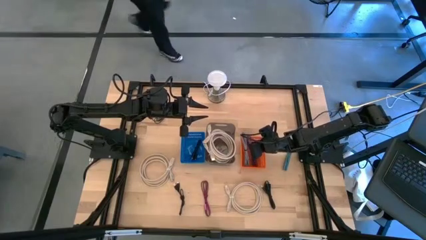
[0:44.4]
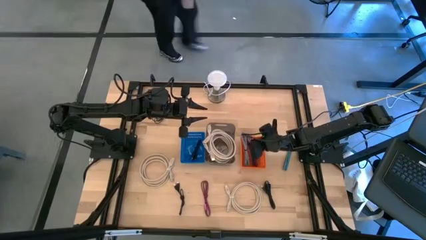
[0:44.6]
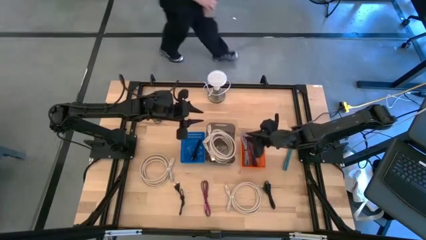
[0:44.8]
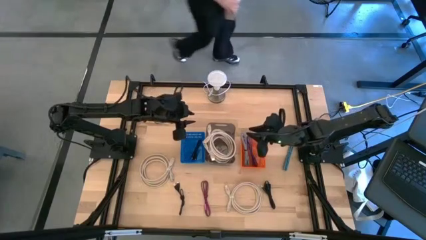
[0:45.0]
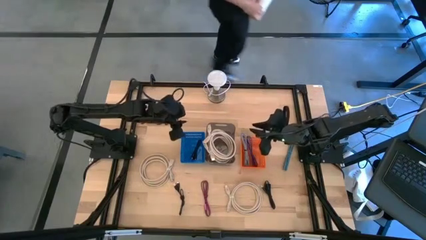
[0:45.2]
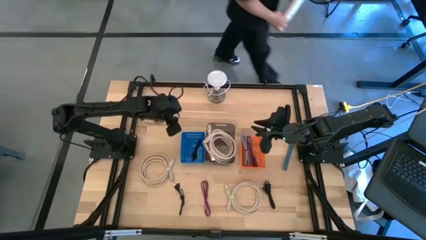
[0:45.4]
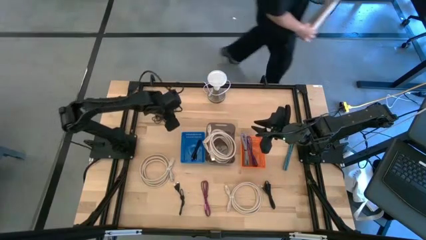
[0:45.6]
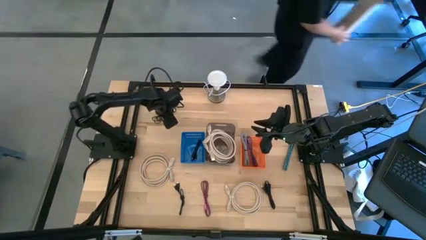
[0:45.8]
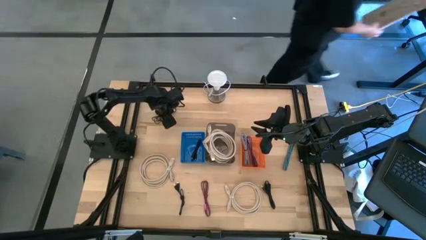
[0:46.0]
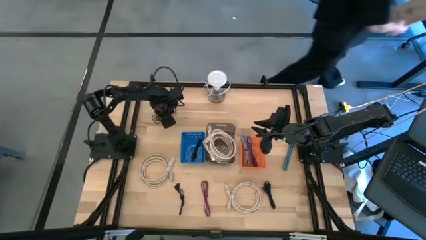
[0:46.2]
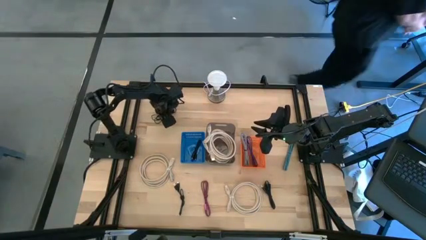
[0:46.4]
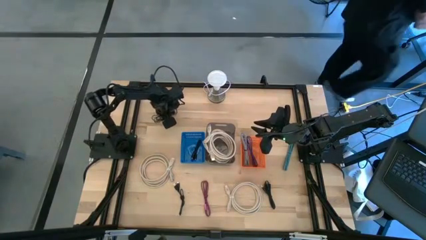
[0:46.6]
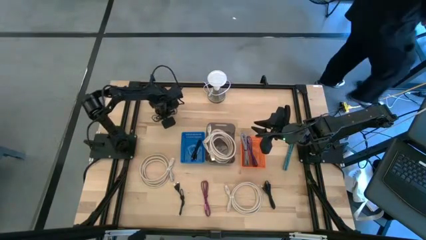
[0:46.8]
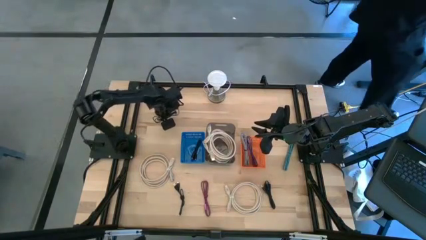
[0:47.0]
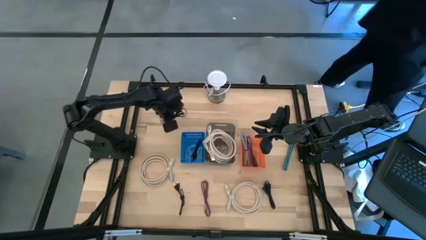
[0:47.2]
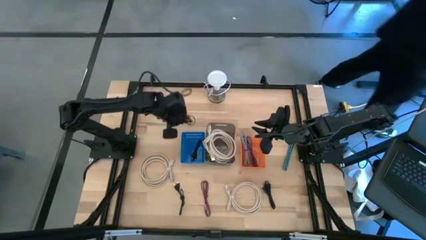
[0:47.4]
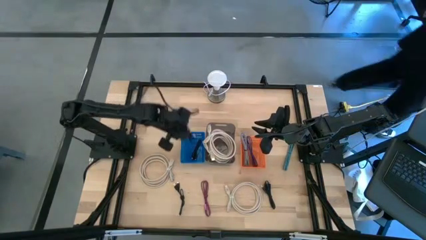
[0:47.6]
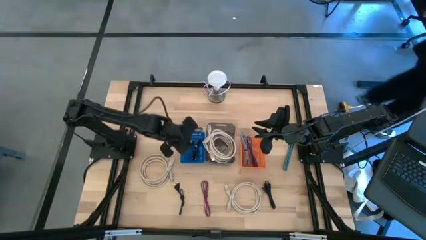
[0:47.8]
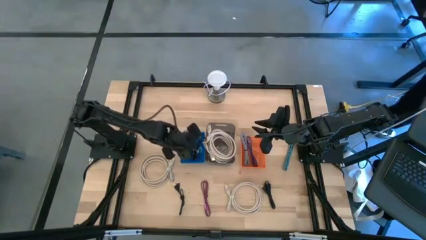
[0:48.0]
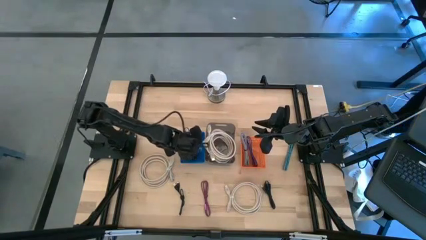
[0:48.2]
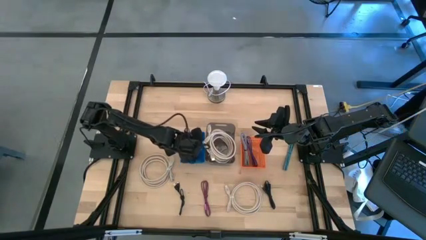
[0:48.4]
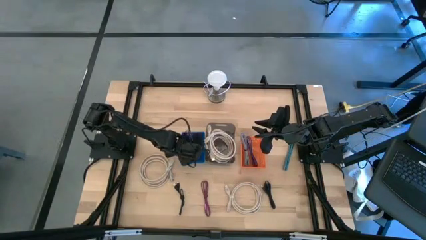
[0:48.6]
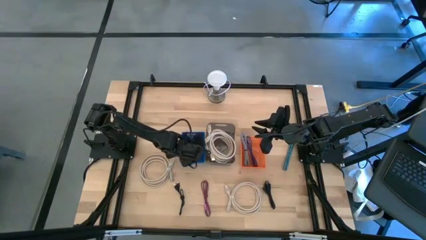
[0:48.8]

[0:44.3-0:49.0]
Task: Pick & Place USB Port
Put the black charger cable into the blue bin

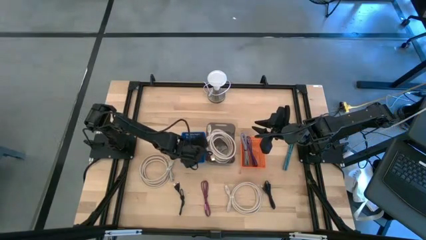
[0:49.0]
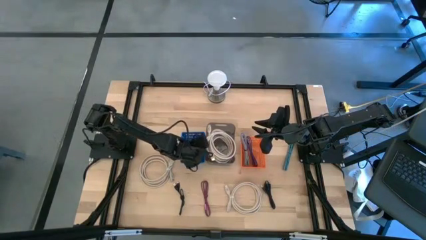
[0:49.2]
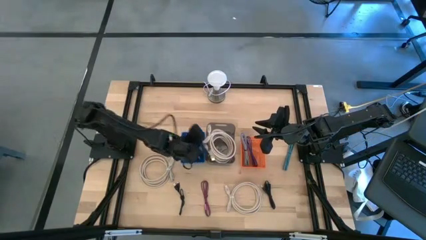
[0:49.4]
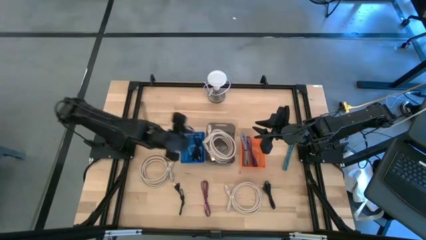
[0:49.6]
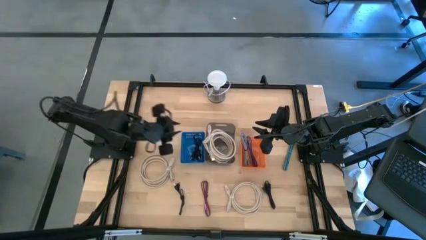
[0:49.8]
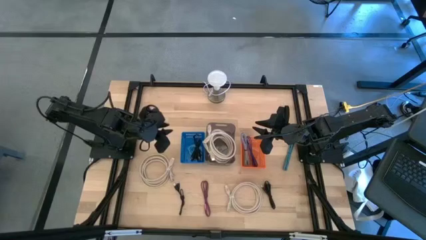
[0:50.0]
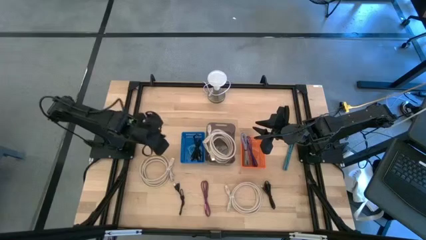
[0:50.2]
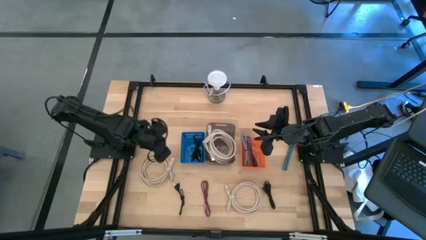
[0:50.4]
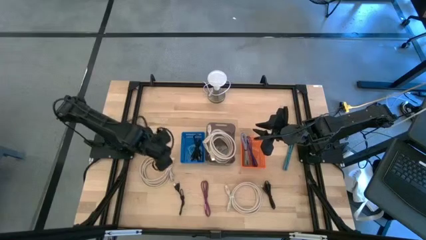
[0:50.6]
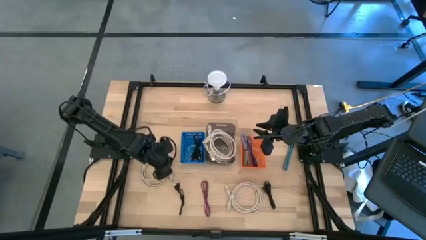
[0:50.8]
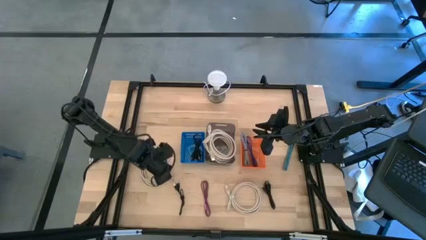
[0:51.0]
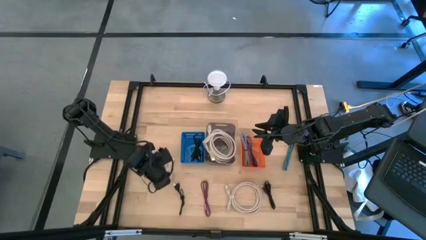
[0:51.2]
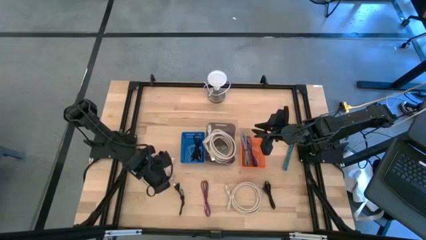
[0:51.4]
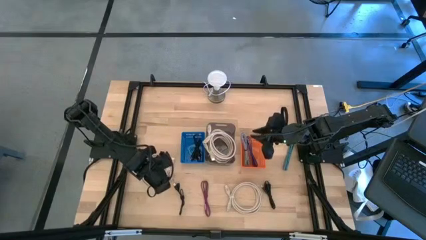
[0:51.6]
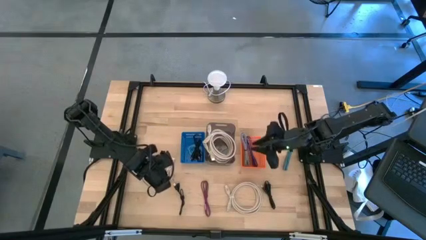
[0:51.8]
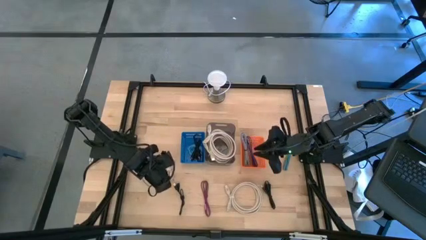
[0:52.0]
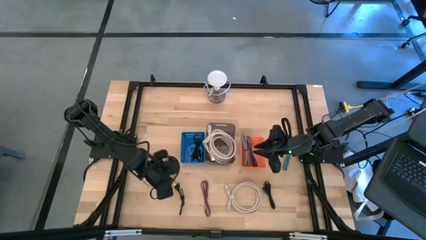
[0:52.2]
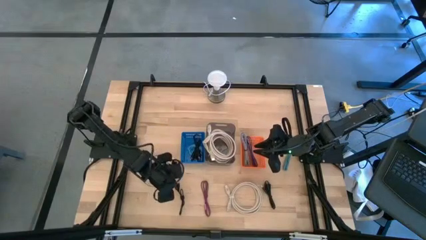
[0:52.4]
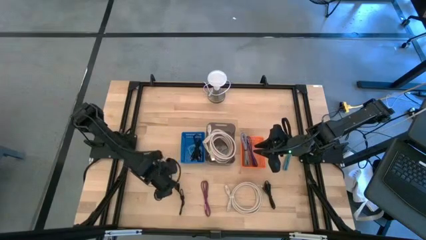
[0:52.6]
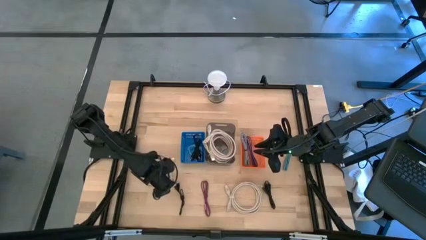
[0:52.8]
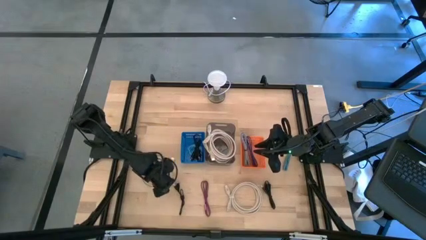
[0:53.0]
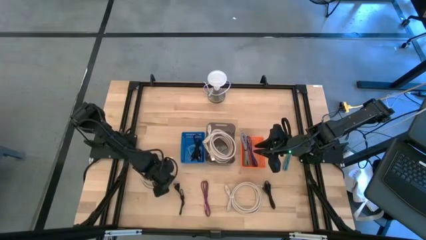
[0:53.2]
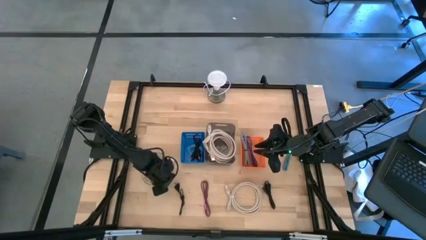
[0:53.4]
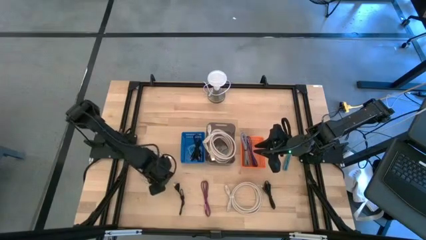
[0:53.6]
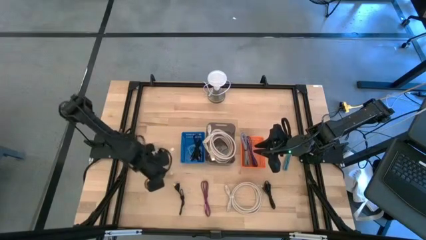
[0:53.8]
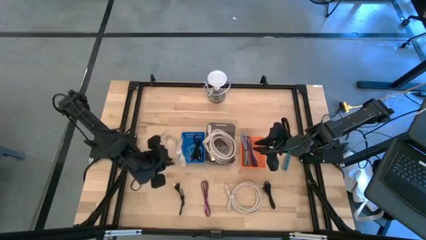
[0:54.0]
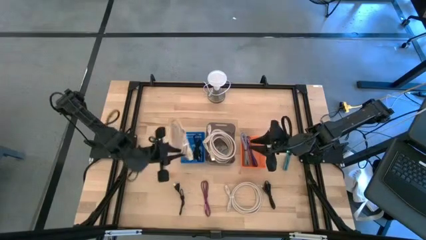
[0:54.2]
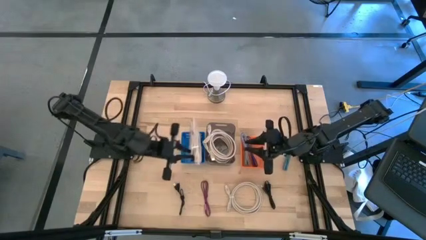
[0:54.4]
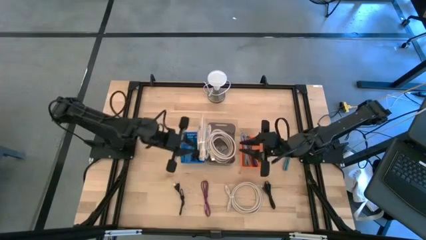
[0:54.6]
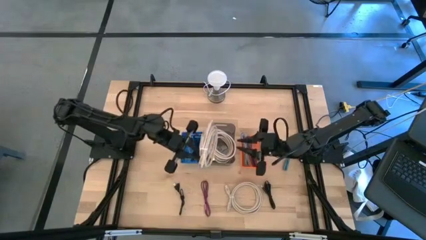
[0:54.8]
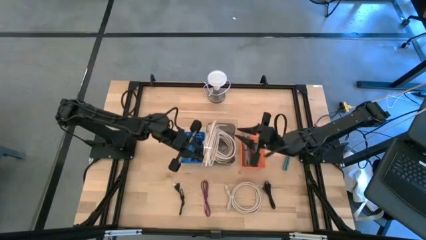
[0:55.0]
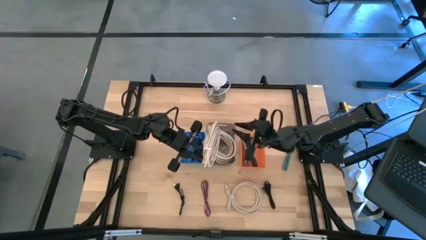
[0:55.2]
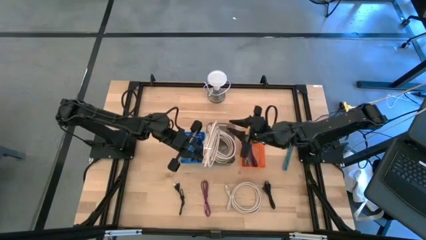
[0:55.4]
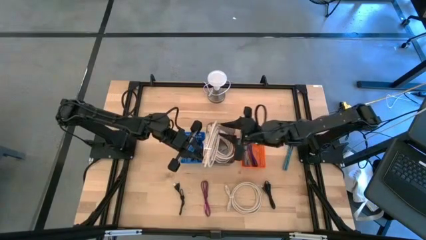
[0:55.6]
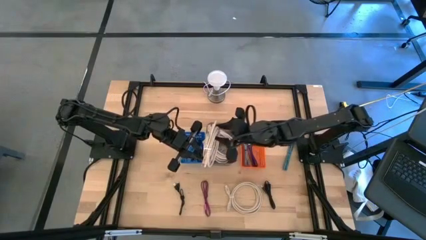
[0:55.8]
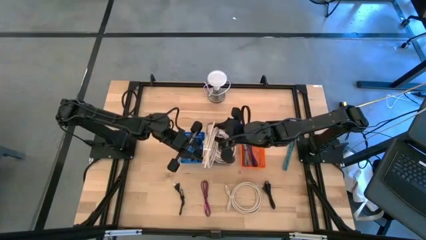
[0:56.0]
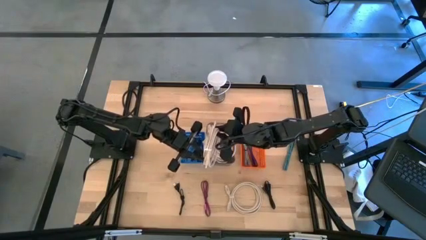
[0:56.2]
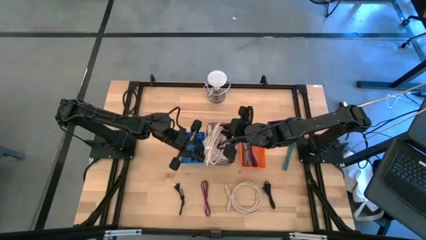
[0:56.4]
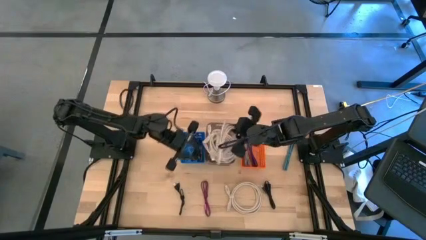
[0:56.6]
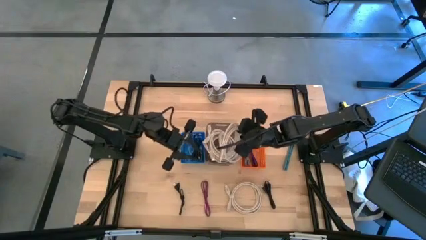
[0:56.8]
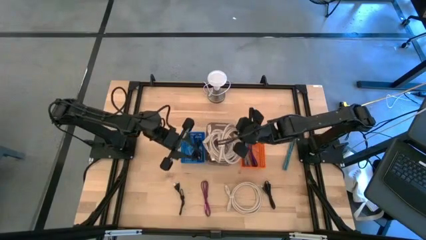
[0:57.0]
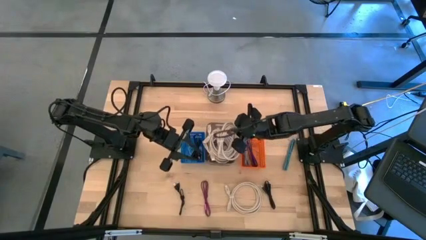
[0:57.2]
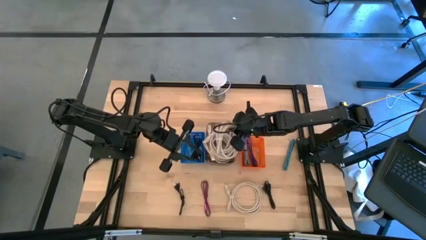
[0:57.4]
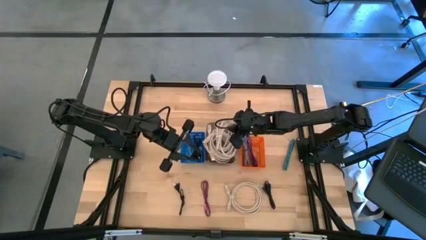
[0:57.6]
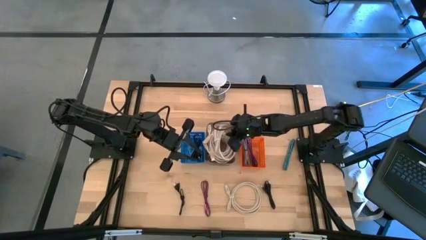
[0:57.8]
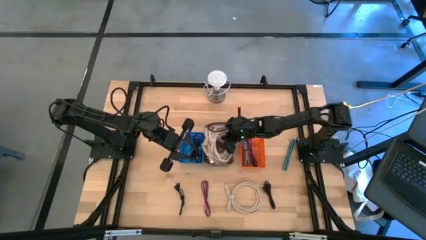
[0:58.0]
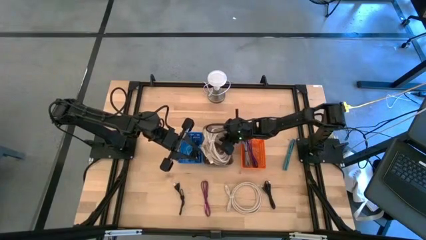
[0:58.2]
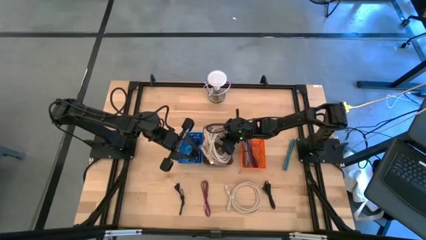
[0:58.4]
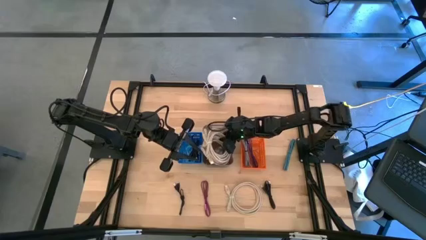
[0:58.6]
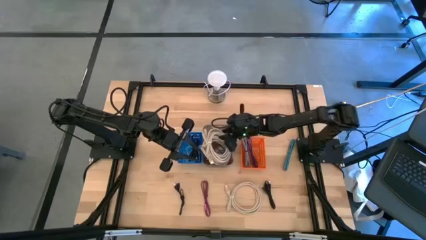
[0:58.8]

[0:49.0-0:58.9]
Put the brown HDMI cable into the black bin

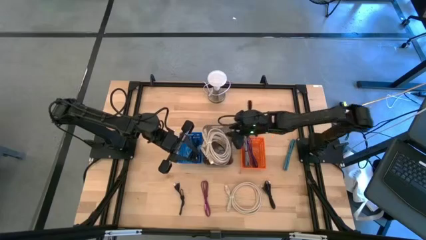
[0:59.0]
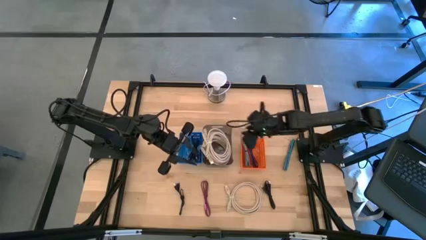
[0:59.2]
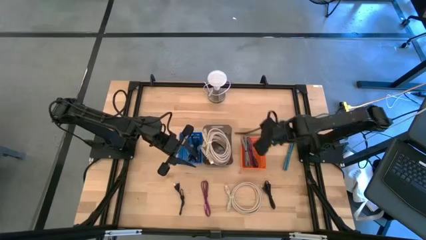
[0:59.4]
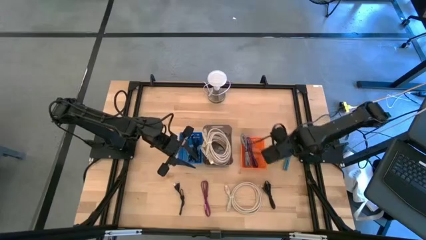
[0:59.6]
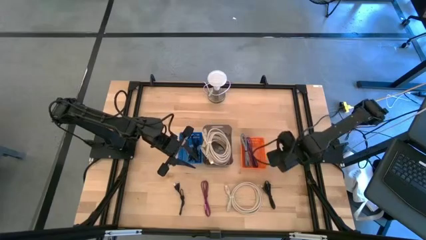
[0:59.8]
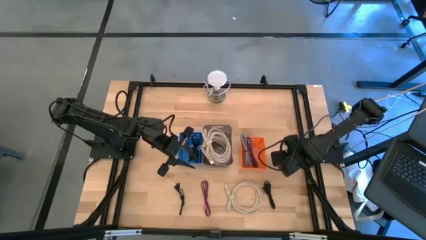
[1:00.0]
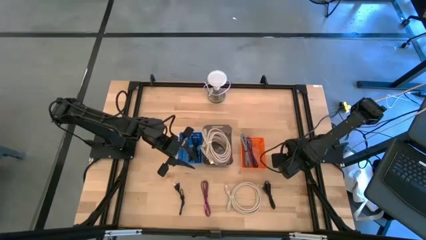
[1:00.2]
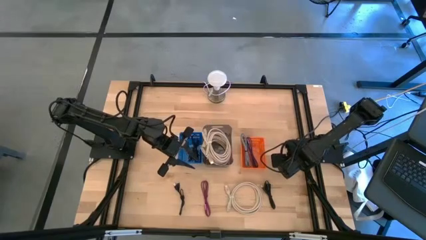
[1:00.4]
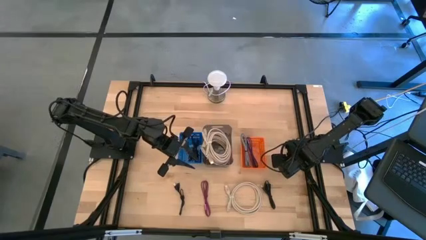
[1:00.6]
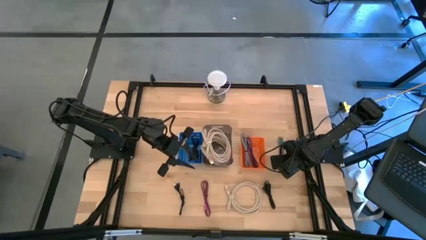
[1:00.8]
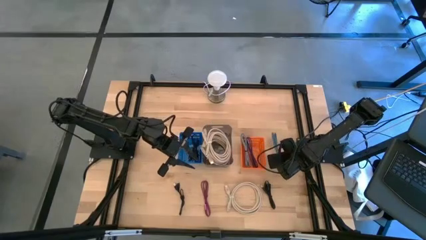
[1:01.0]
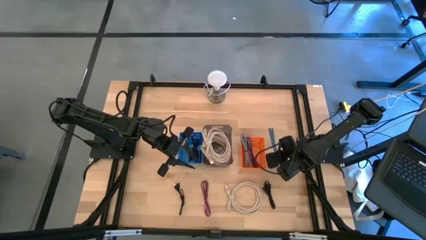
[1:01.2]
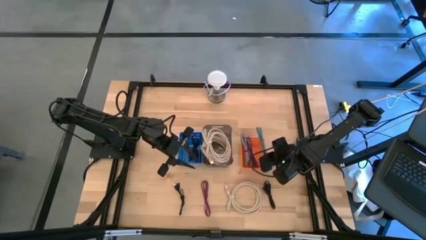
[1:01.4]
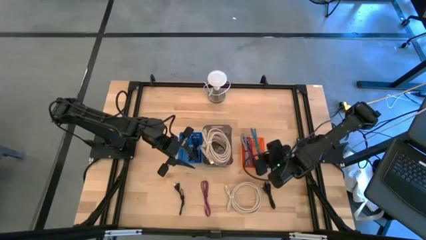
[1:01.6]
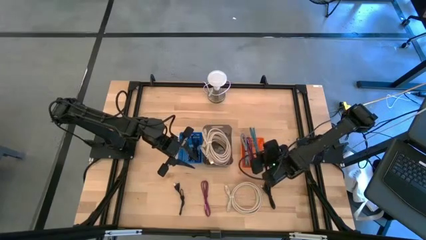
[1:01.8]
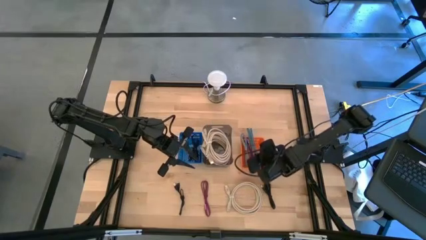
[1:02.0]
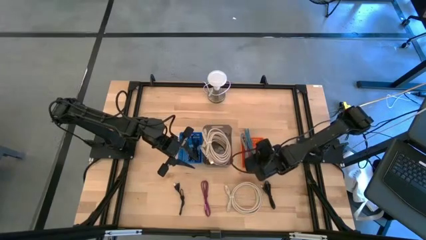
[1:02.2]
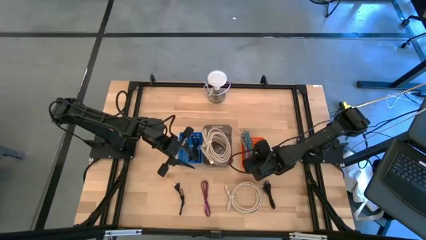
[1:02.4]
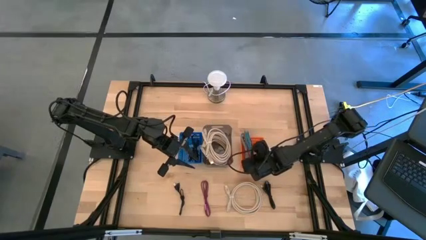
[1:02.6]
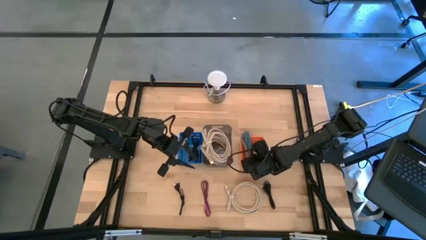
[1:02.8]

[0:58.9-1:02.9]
Put the blue charger cable into the orange bin
